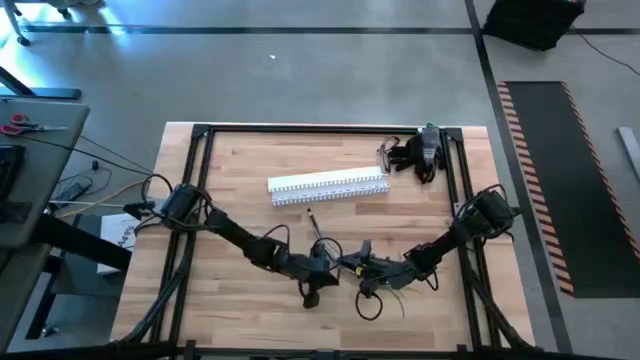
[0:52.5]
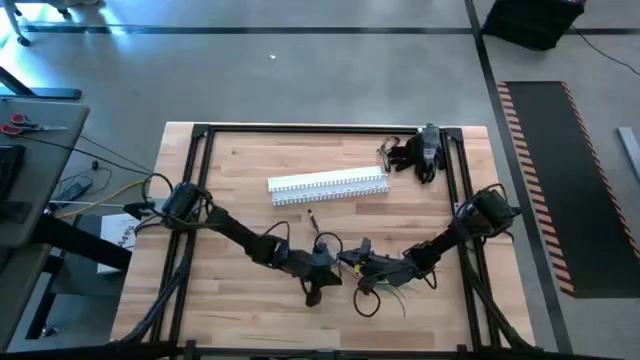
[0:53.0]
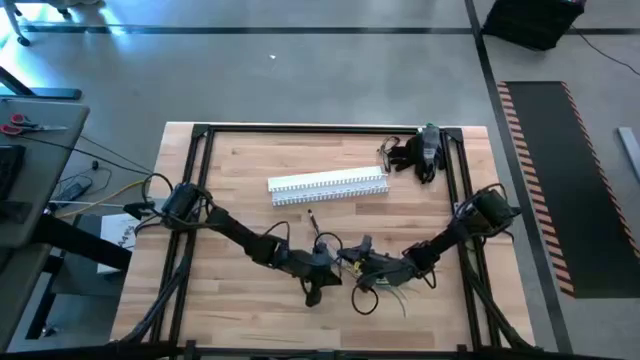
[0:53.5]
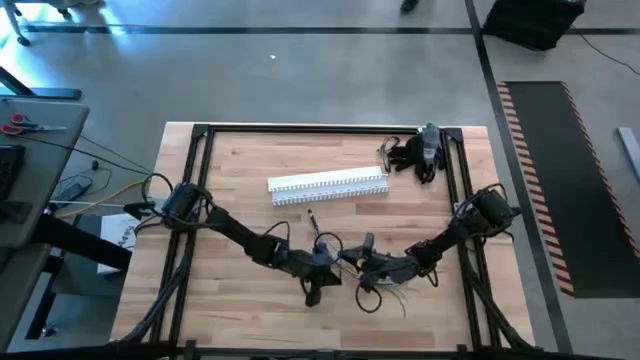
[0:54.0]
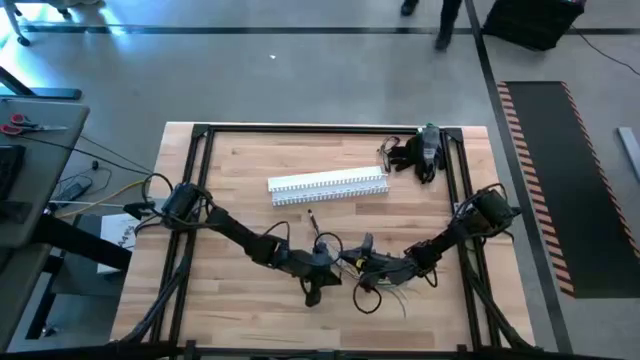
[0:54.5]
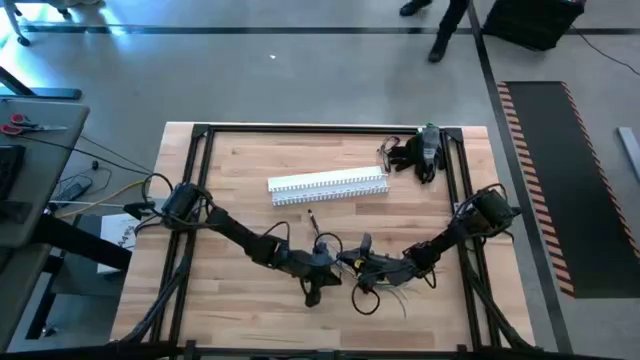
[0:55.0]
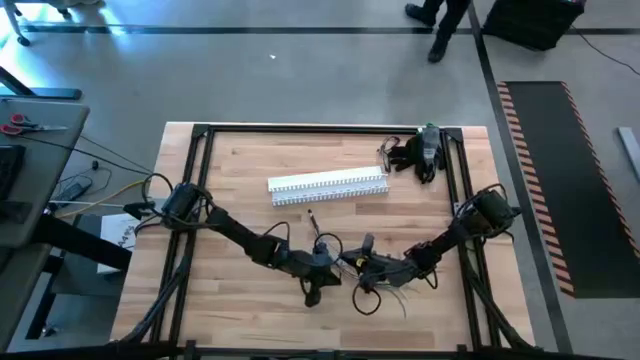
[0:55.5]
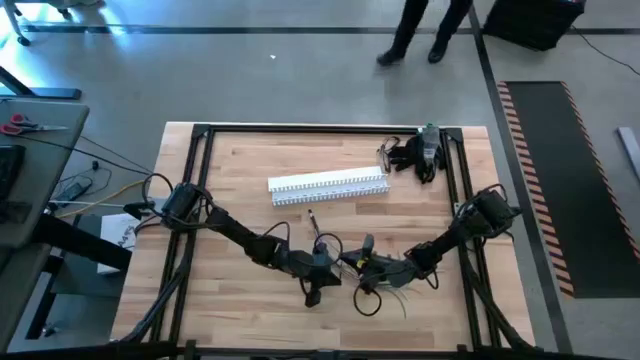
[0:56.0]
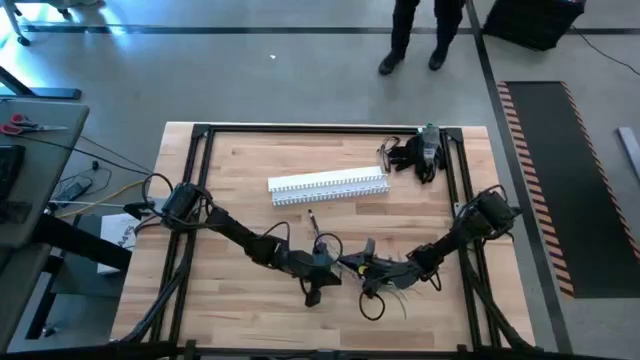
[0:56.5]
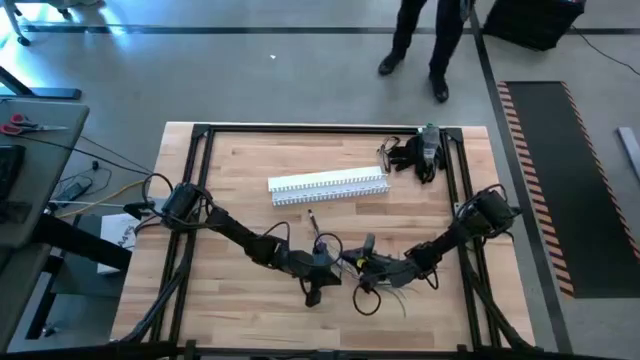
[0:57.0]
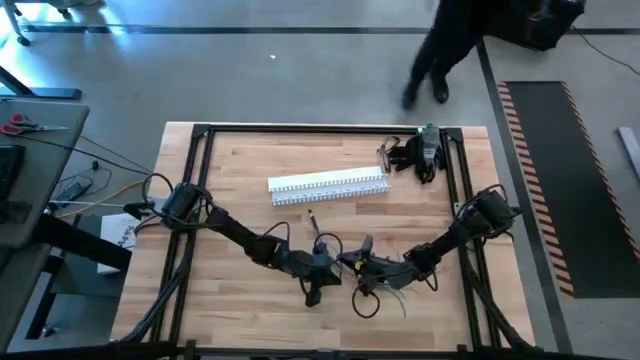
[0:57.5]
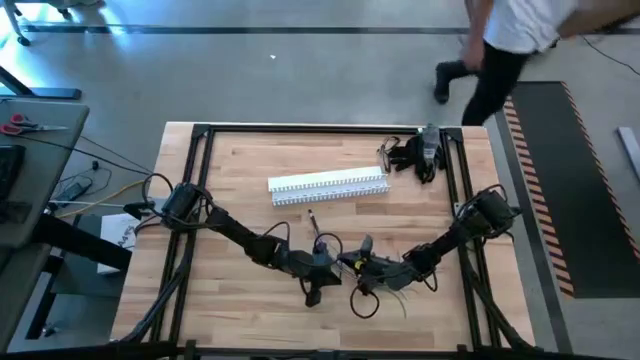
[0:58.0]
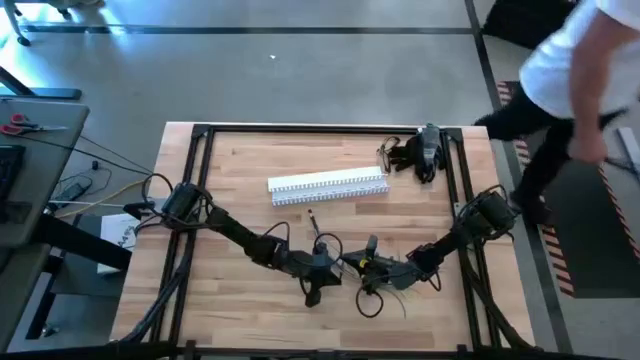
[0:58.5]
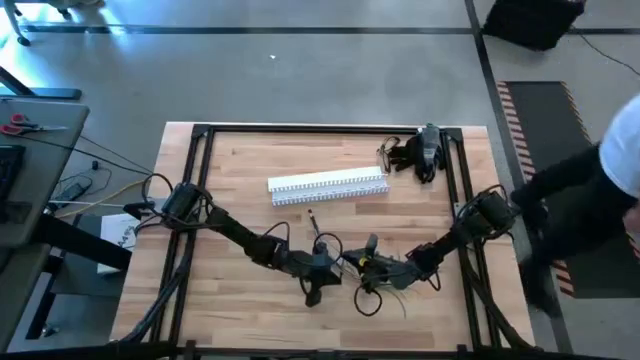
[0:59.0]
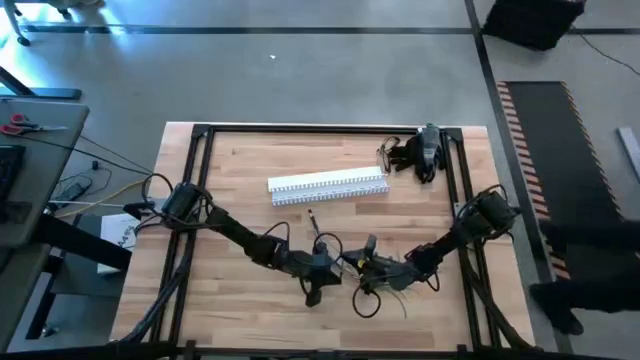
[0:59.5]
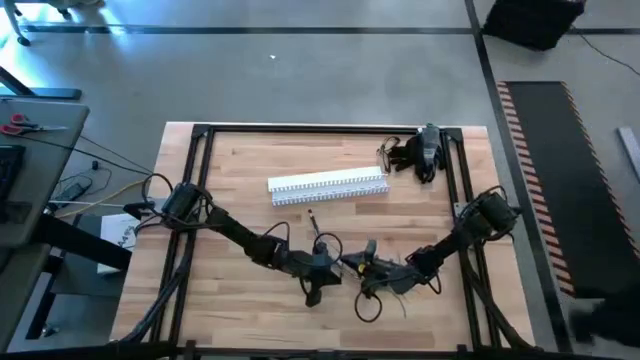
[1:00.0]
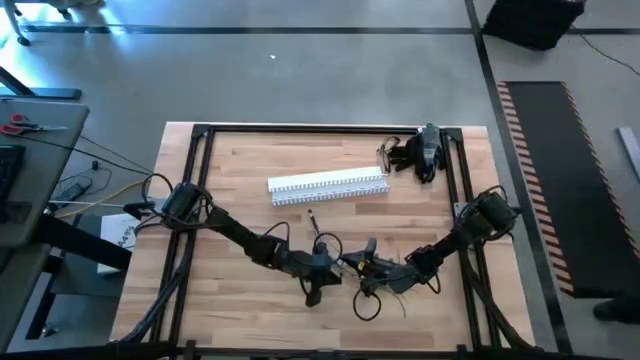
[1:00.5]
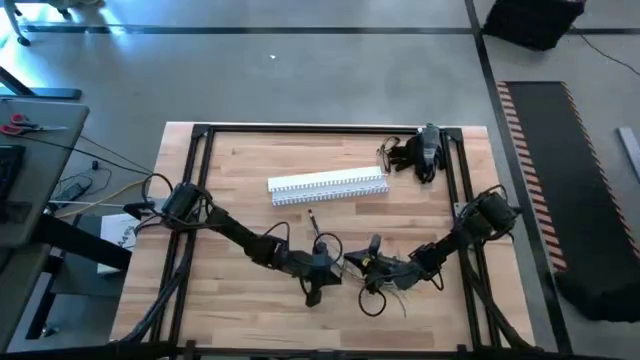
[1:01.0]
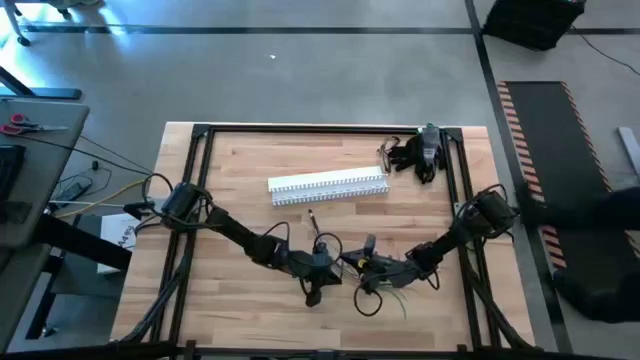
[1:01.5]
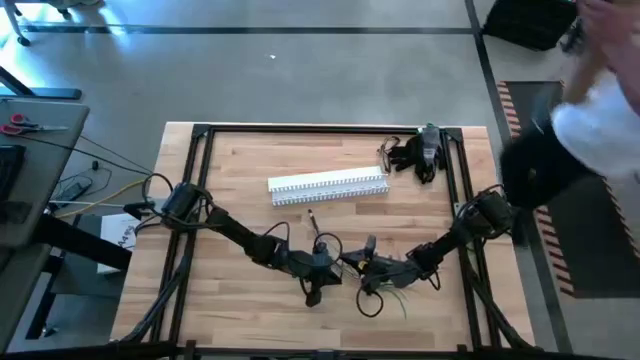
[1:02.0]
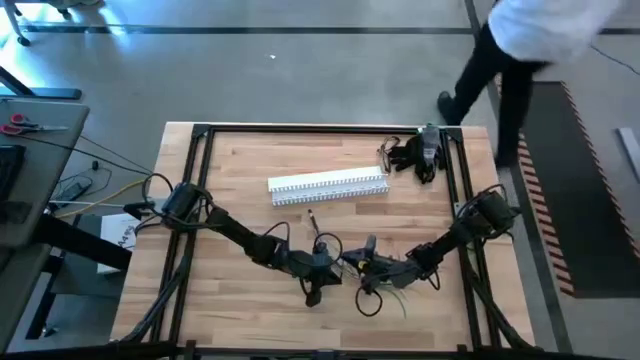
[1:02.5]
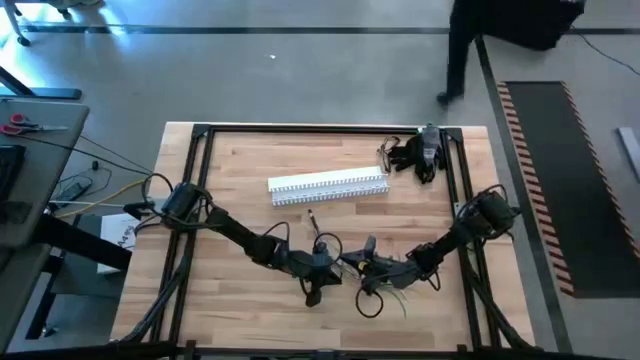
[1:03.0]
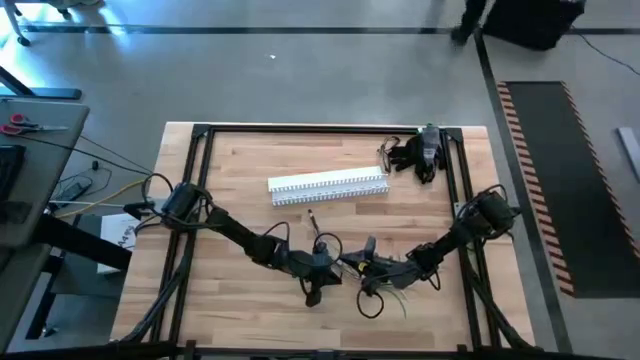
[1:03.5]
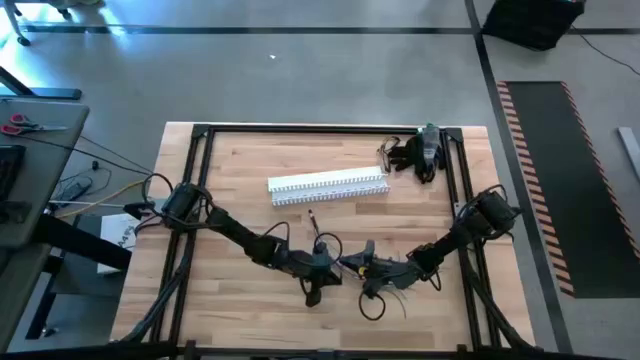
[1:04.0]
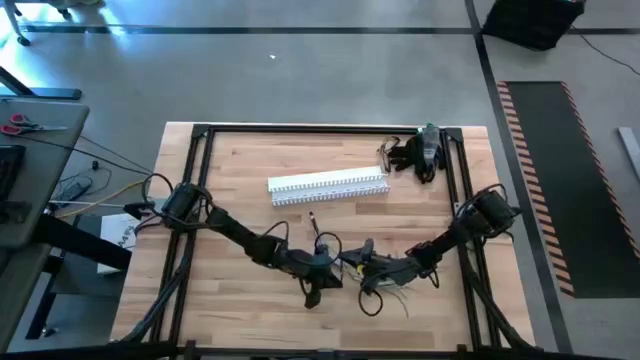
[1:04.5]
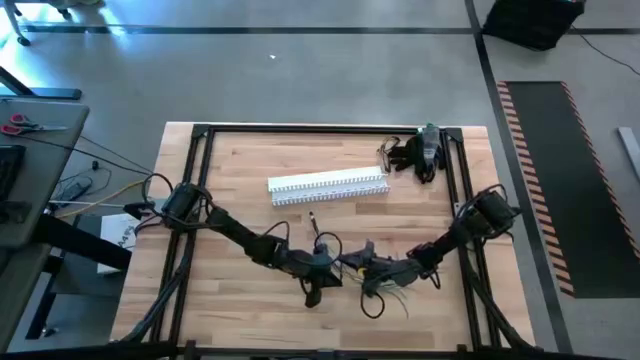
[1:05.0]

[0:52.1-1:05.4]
Task: Ziptie cables
Wrap the cable wires with black ziptie

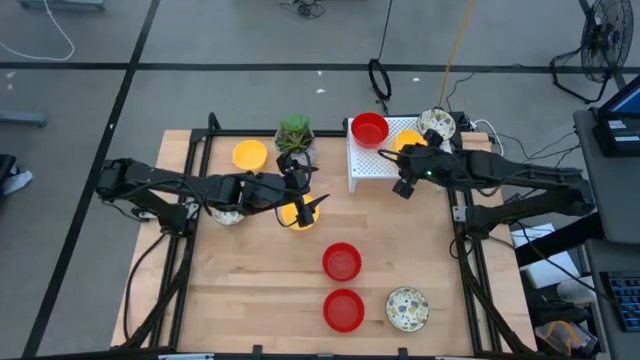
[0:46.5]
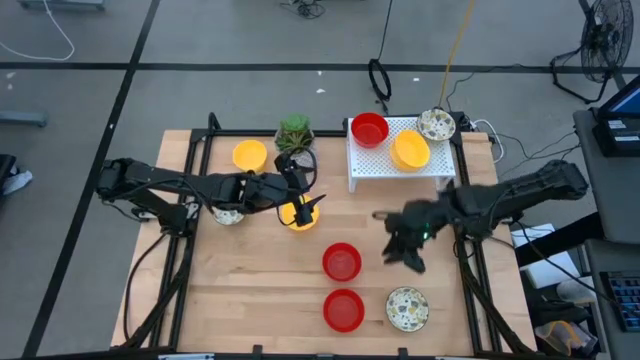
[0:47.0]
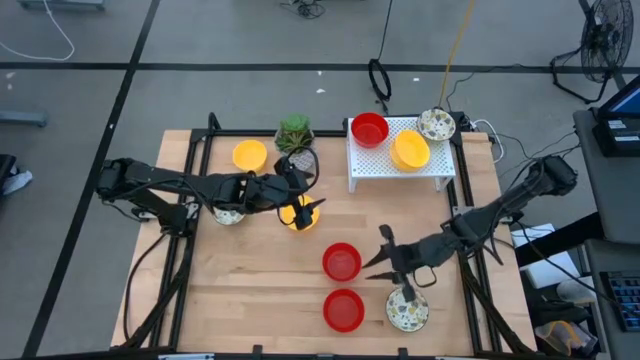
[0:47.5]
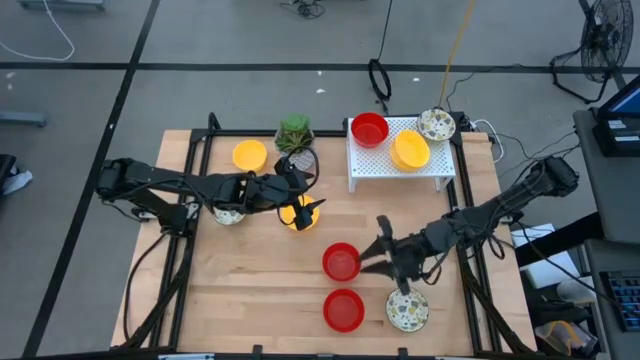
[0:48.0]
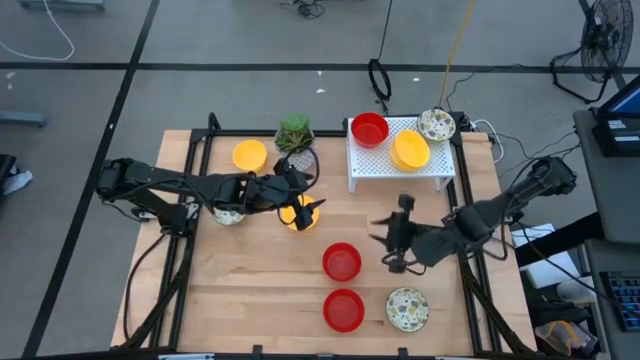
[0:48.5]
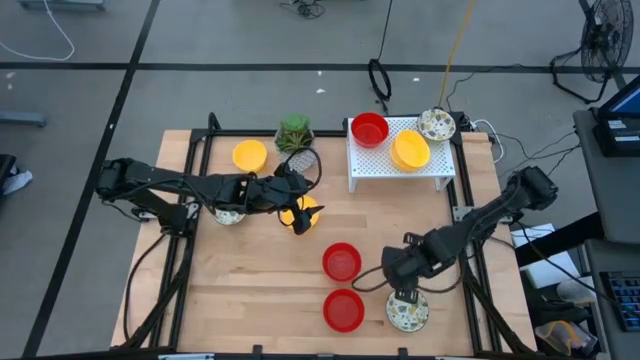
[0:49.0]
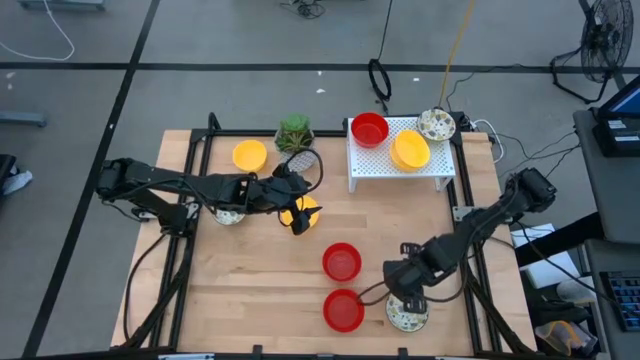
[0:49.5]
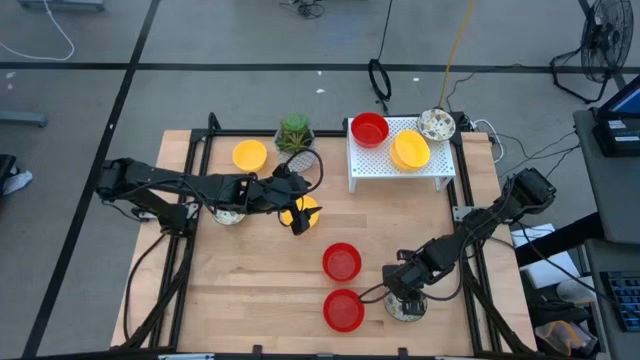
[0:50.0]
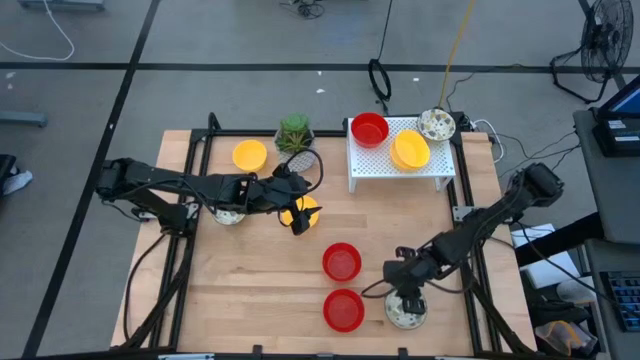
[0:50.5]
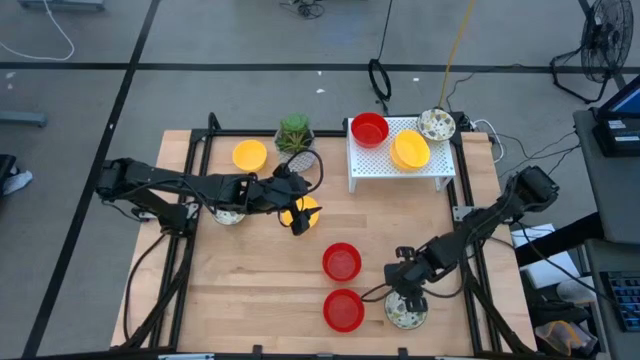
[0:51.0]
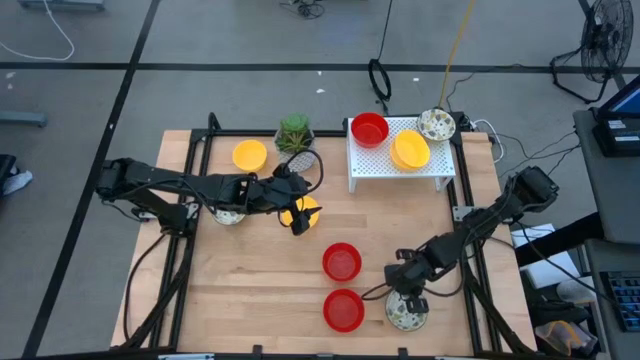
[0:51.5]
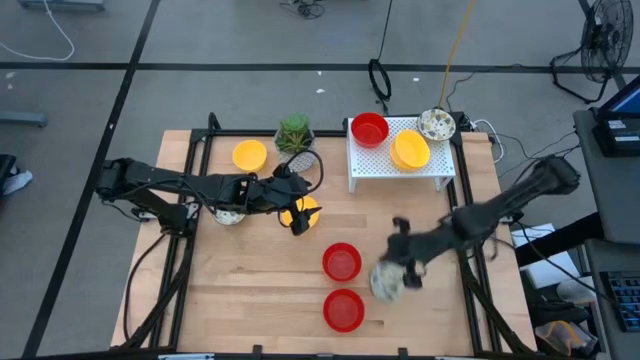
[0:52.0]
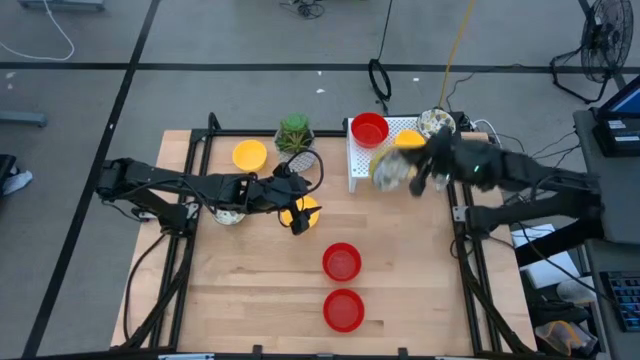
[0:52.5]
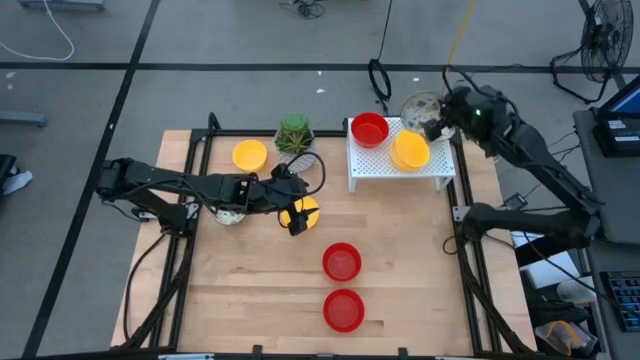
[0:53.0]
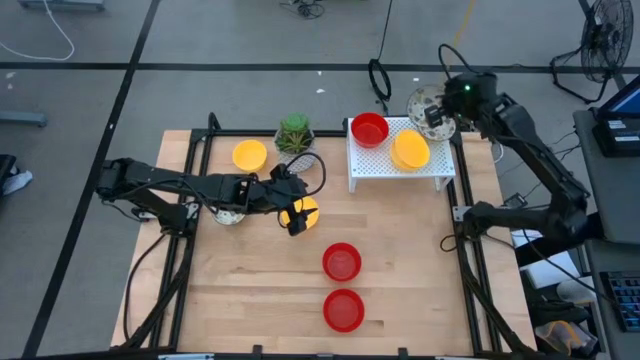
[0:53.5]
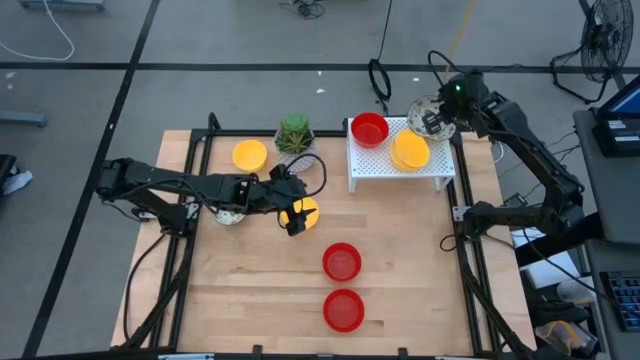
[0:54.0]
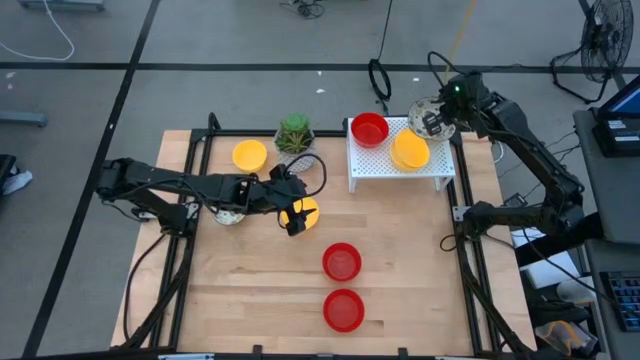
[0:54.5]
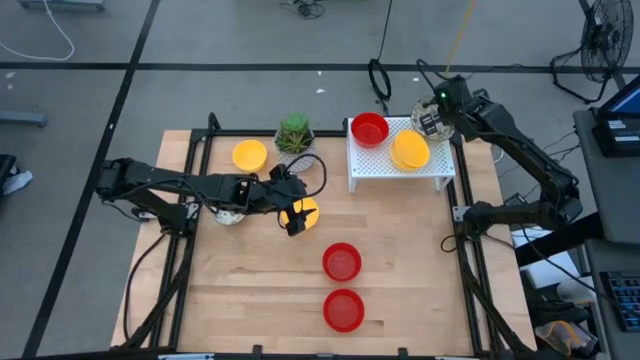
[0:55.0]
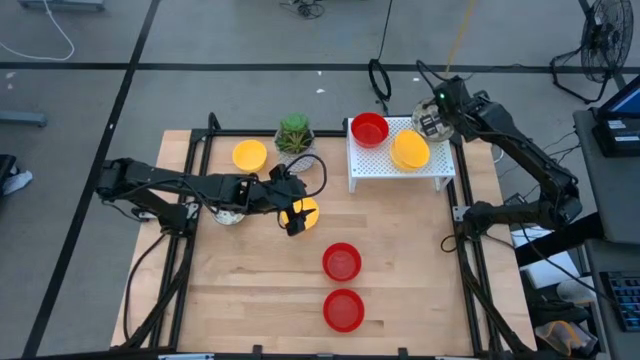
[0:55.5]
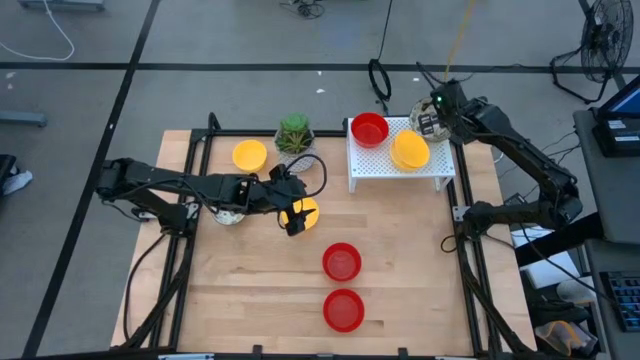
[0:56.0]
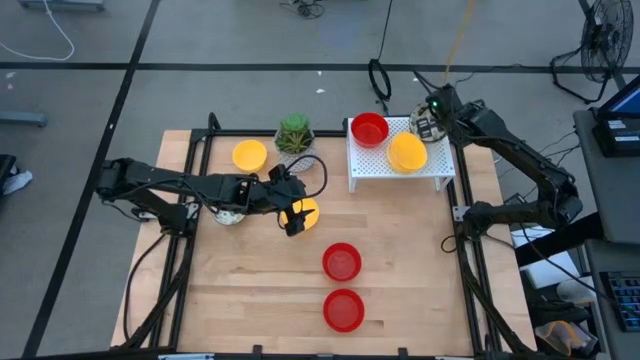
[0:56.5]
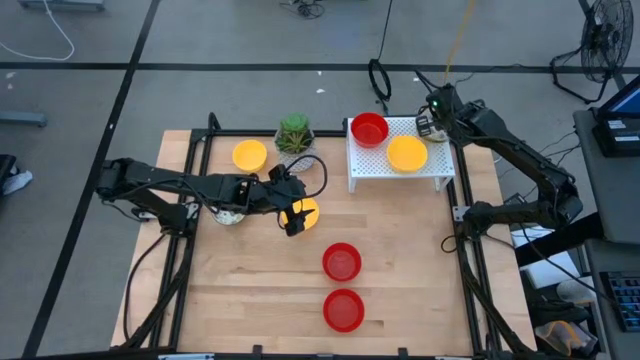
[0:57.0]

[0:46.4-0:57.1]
Task: Pick & Place Mini bowls
Stack the white and yellow bowl on top of the other white and yellow bowl on the shelf
